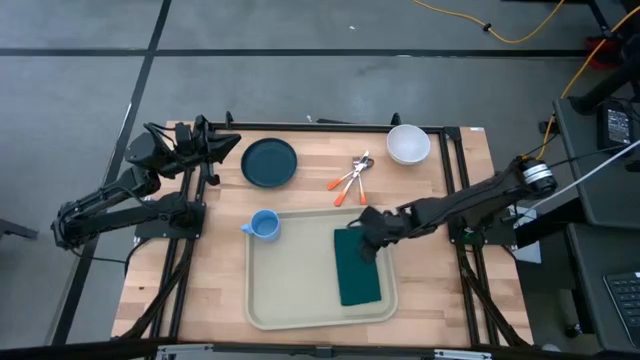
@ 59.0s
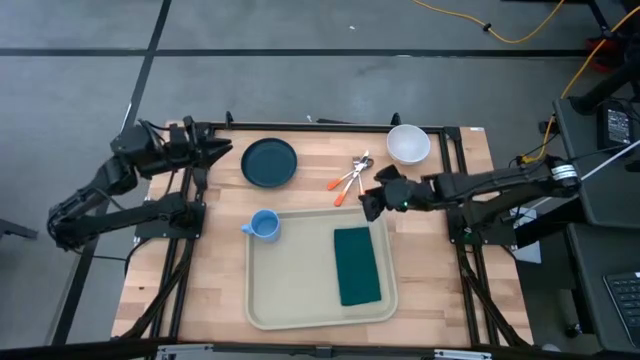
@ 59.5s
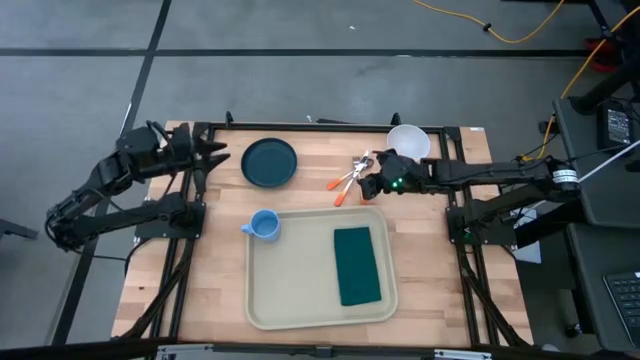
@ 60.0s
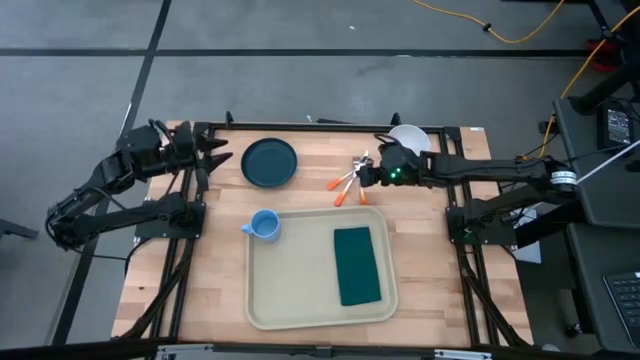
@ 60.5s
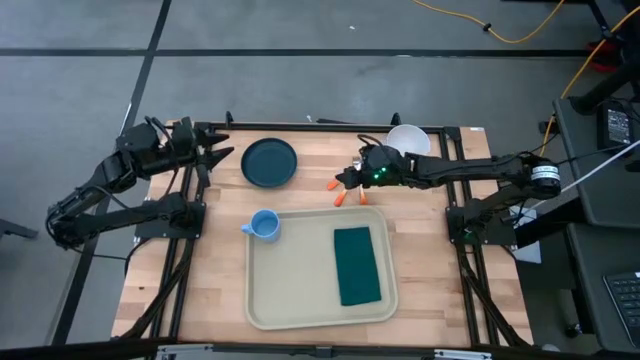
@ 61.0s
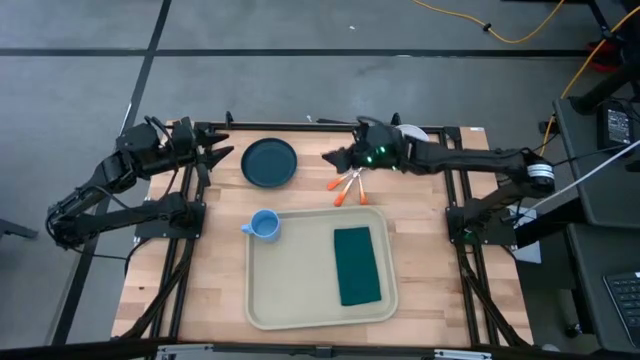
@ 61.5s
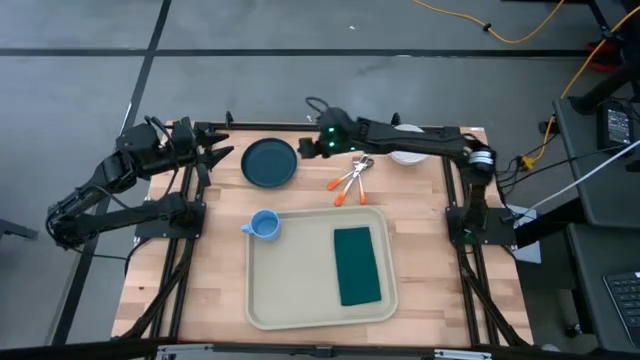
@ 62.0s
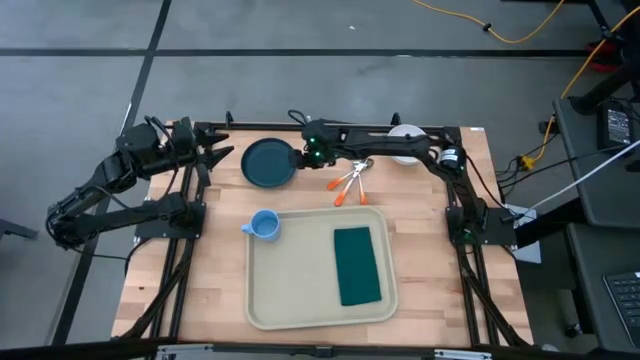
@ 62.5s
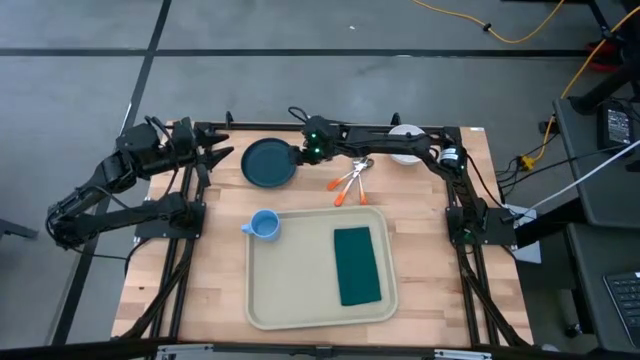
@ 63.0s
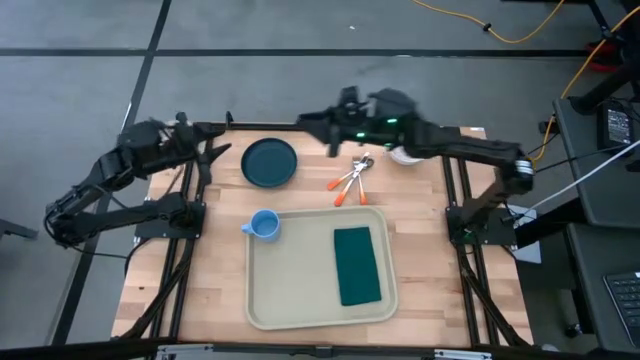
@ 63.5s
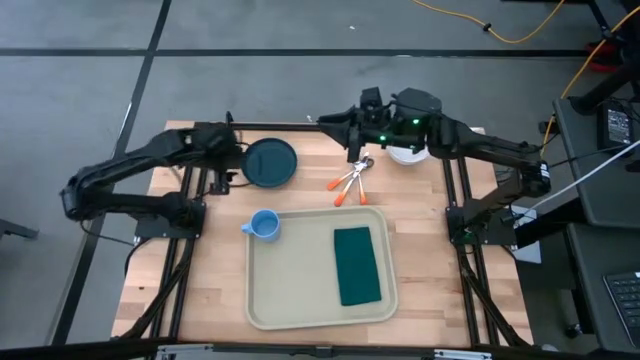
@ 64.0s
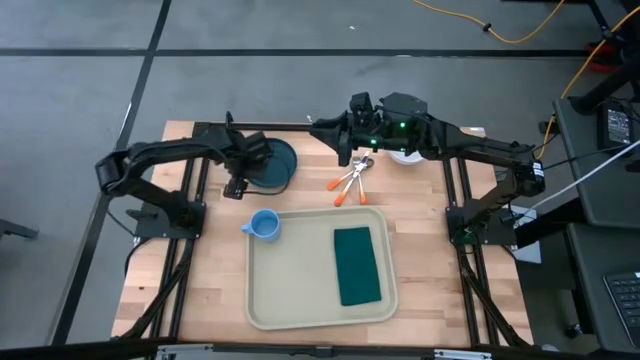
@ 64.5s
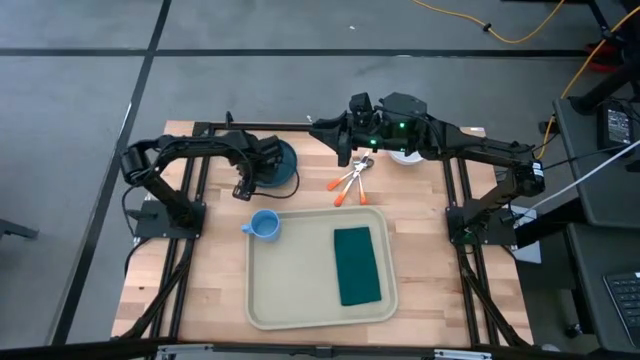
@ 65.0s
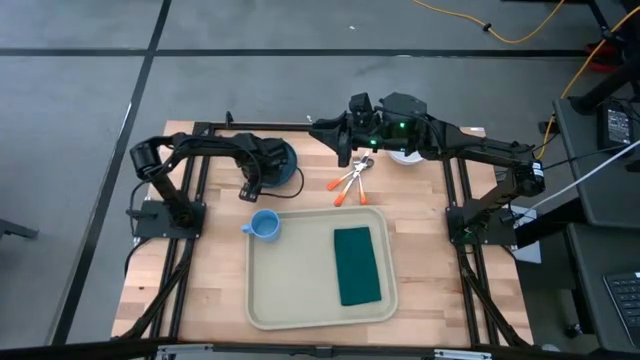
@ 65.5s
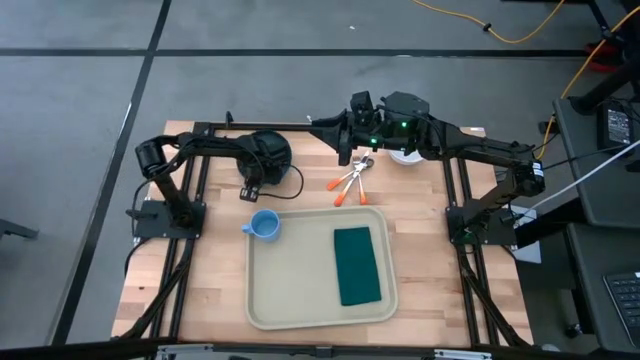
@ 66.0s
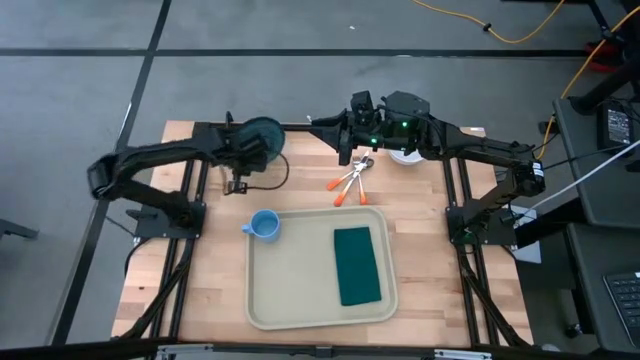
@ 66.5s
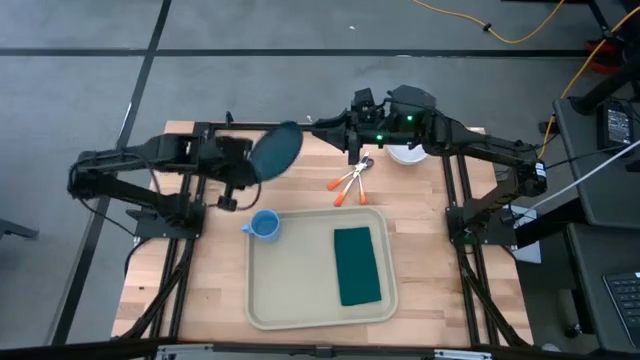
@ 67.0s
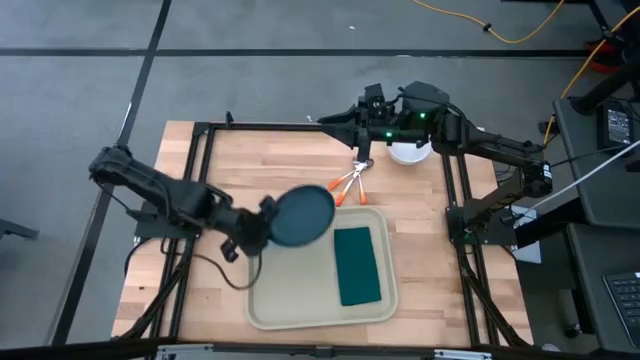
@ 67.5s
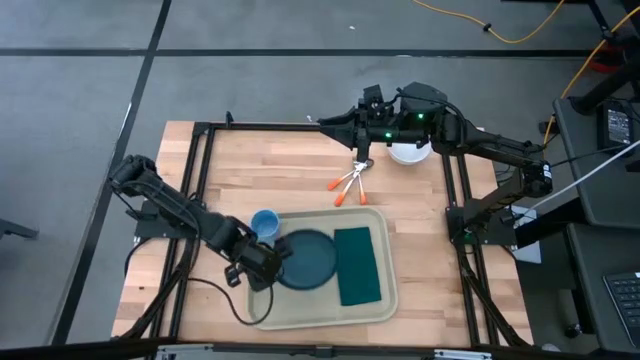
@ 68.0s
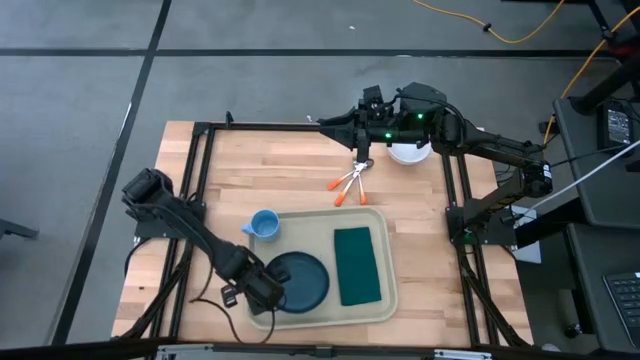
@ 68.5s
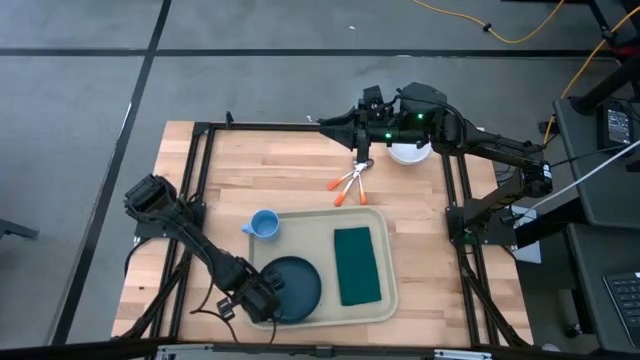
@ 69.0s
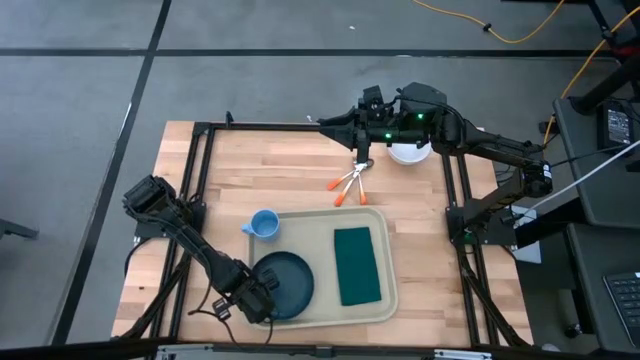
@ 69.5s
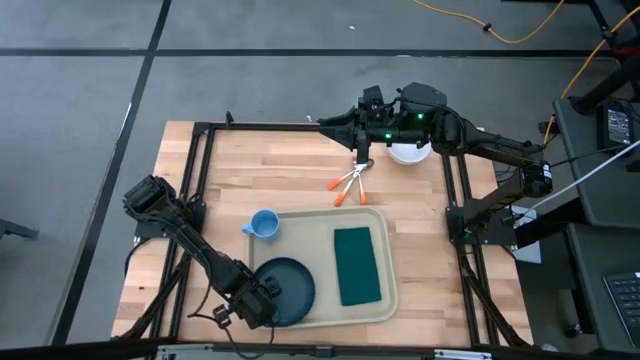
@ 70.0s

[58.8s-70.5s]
Task: Set up tray
Put the black plate on the light brown serving tray to the bottom of the blue mug

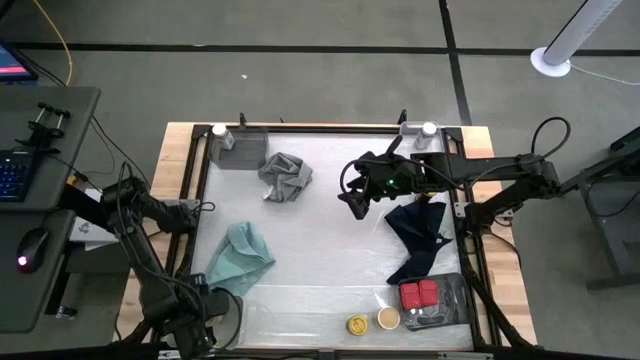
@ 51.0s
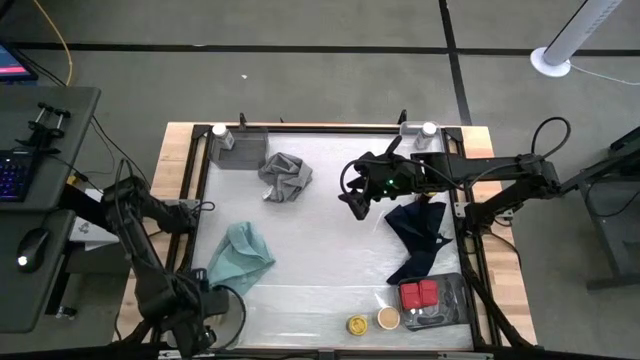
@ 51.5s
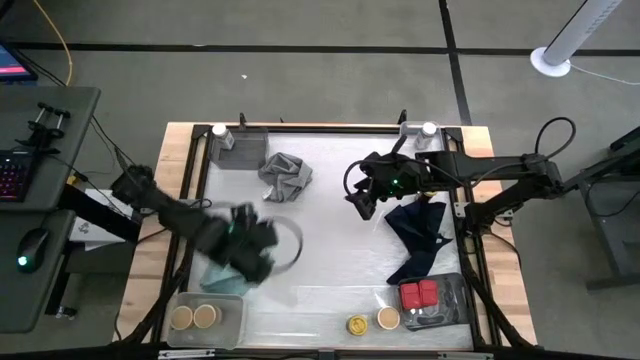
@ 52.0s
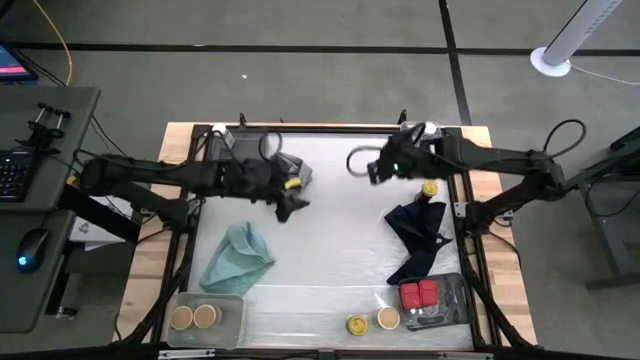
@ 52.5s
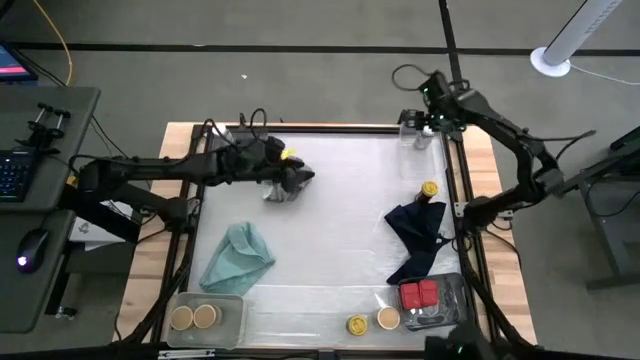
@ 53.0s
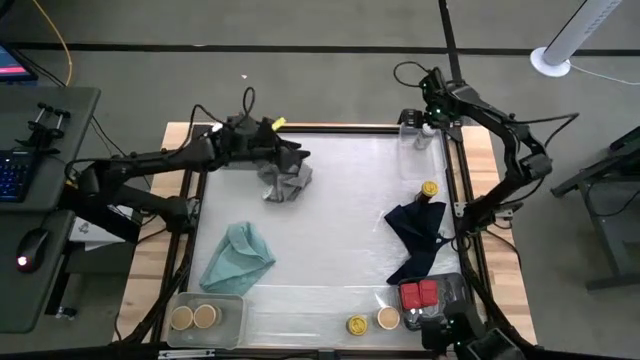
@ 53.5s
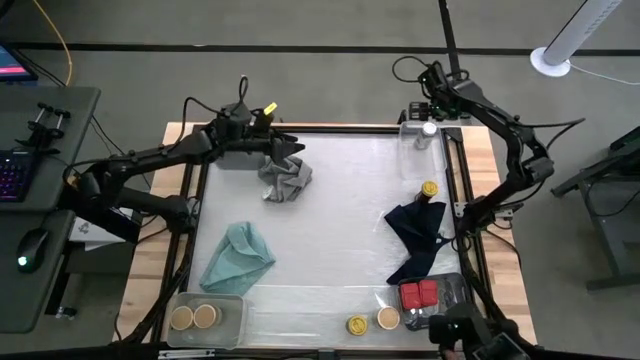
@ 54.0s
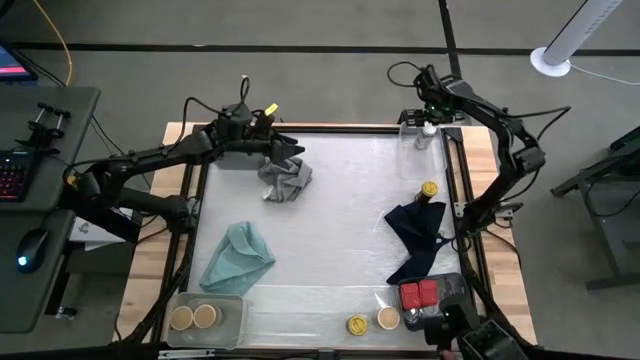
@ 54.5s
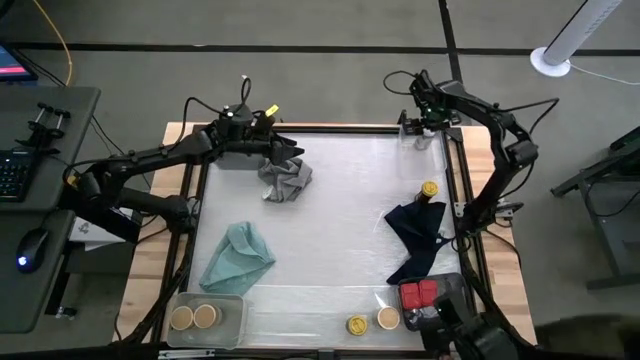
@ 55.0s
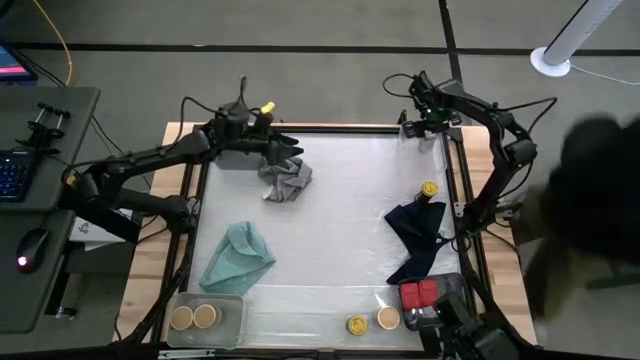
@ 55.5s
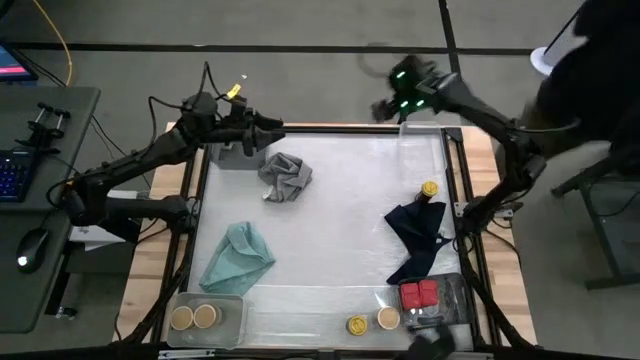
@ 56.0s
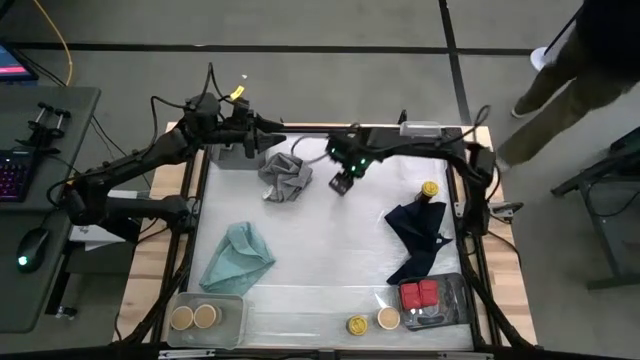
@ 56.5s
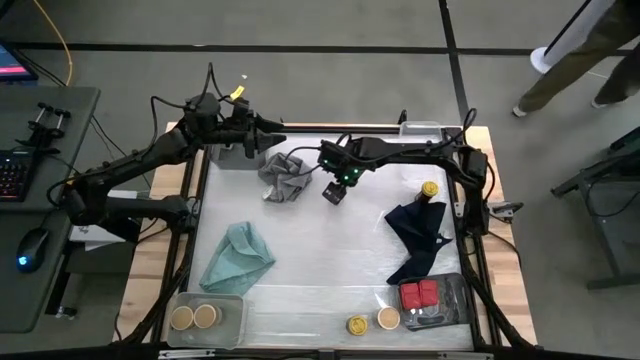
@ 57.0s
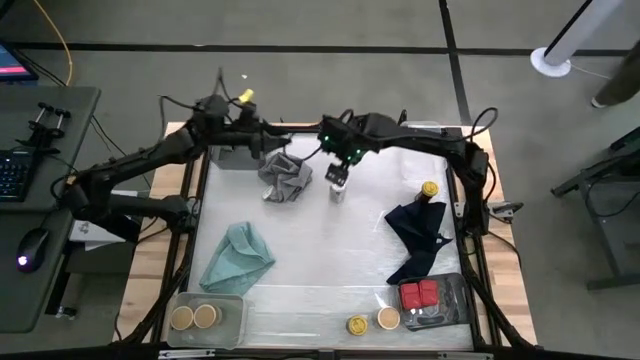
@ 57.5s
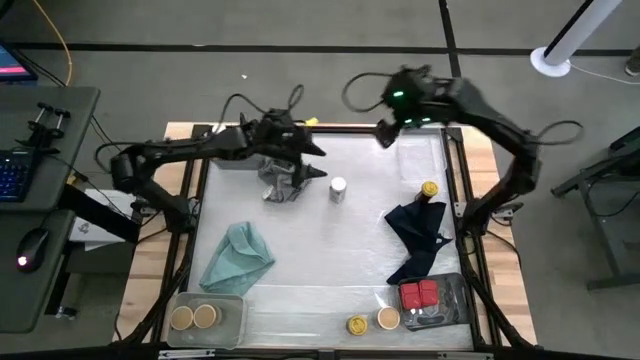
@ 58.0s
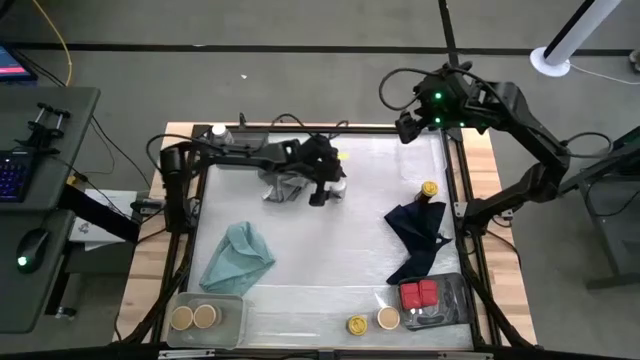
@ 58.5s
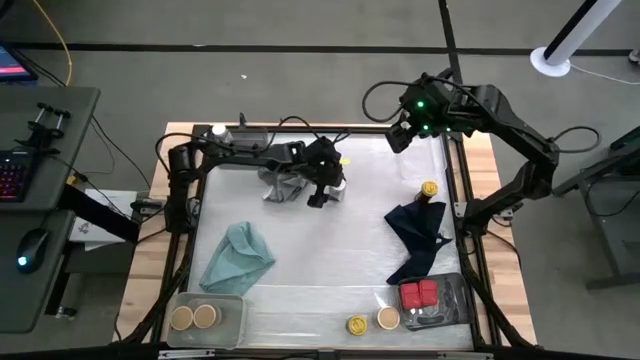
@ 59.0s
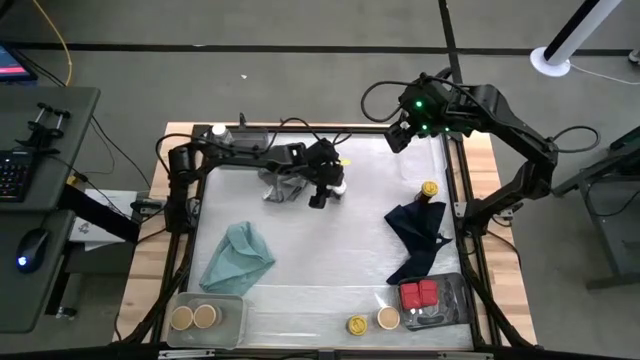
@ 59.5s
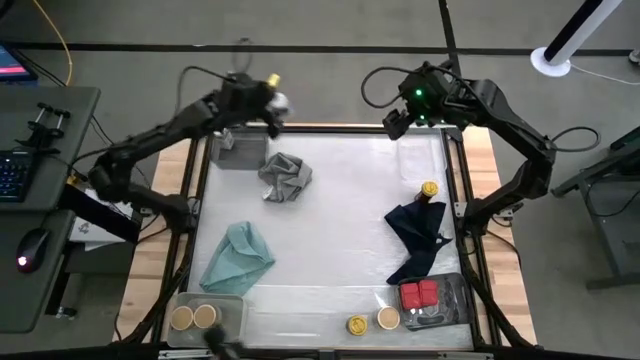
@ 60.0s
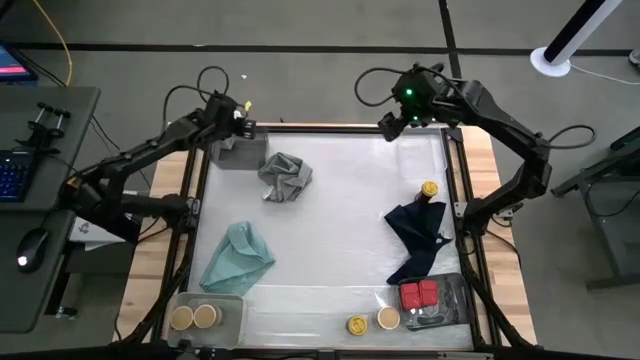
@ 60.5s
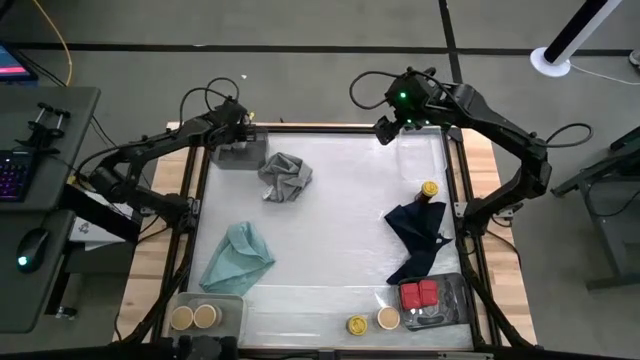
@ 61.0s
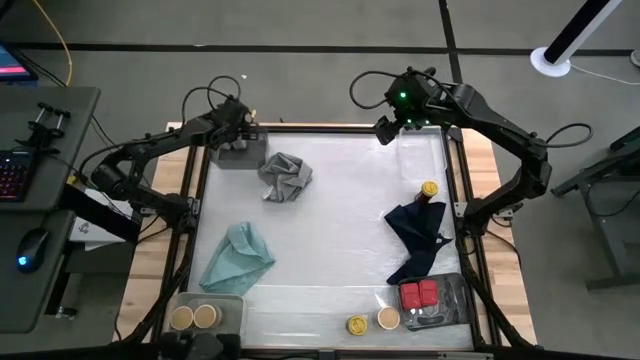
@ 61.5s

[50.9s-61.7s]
Task: Sort spices by type
Put the white seasoning bottle into the top black bin
